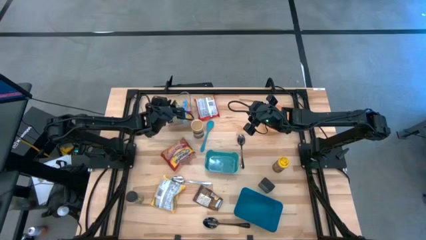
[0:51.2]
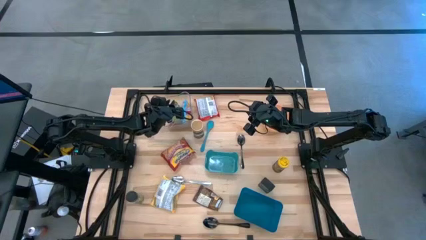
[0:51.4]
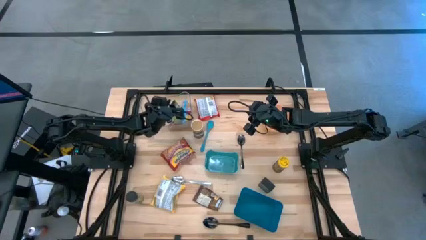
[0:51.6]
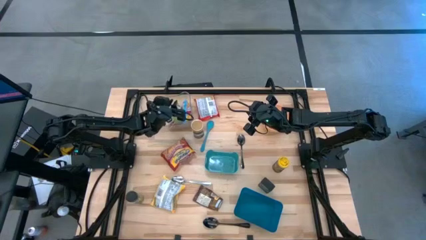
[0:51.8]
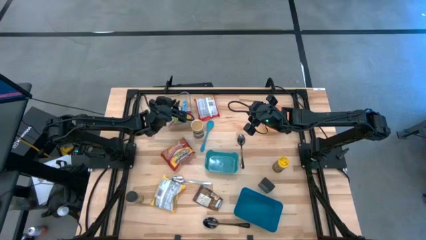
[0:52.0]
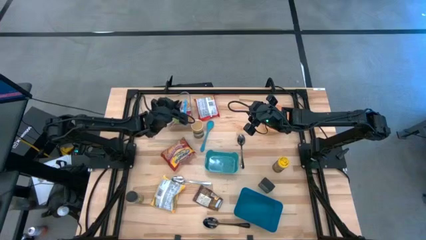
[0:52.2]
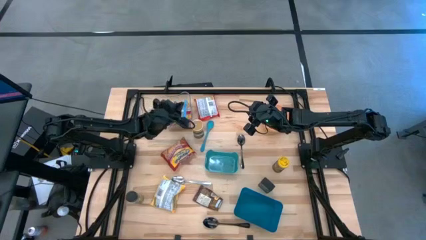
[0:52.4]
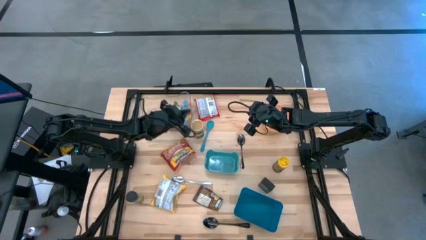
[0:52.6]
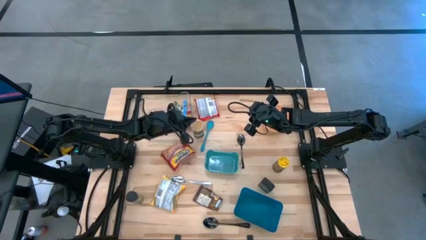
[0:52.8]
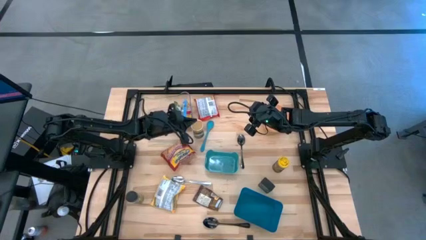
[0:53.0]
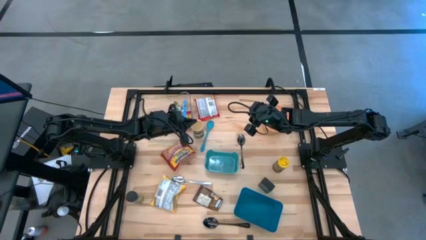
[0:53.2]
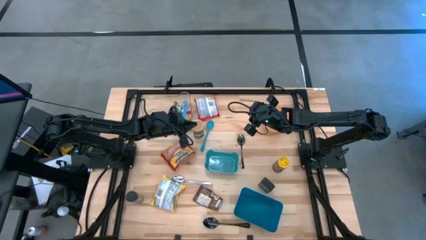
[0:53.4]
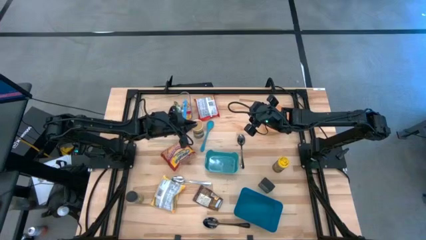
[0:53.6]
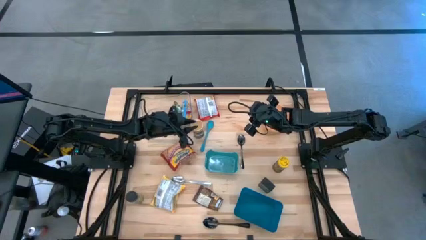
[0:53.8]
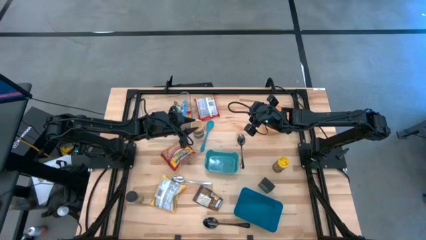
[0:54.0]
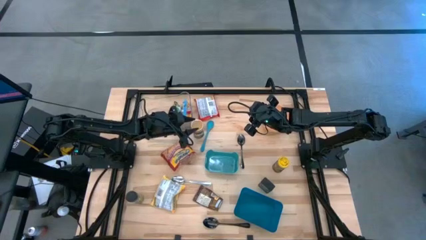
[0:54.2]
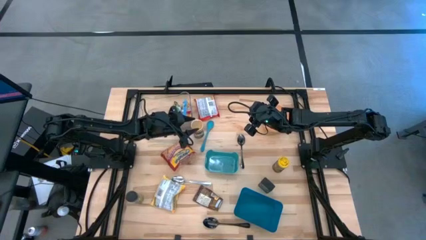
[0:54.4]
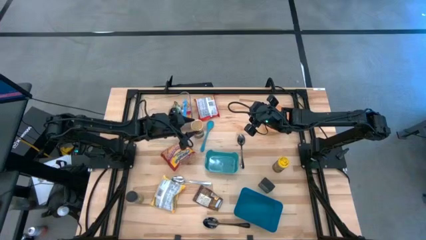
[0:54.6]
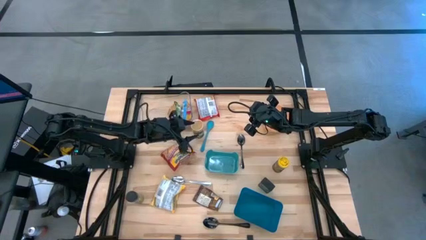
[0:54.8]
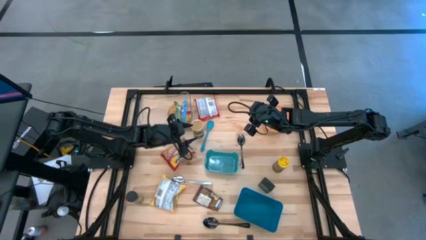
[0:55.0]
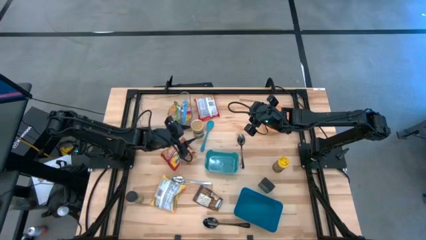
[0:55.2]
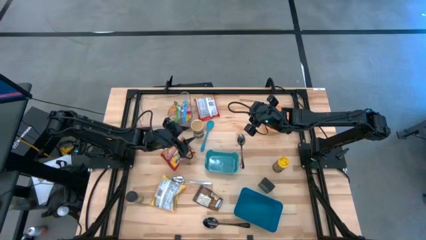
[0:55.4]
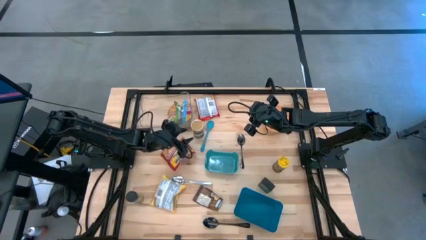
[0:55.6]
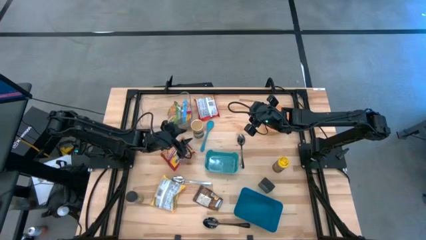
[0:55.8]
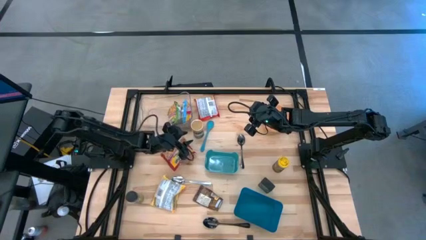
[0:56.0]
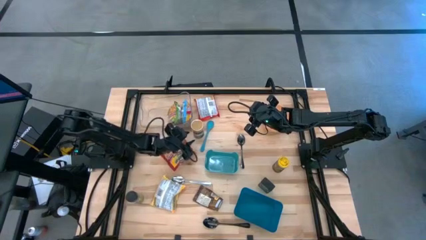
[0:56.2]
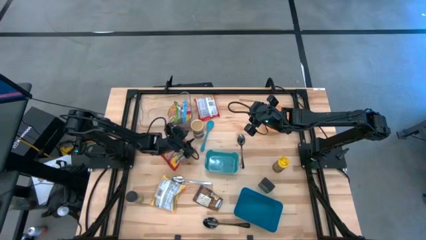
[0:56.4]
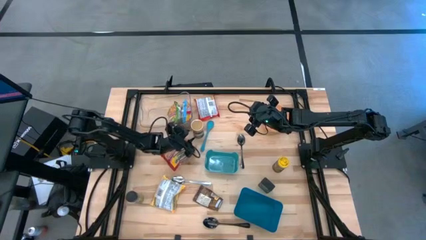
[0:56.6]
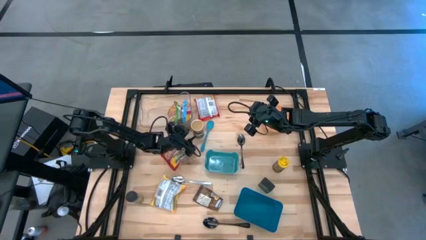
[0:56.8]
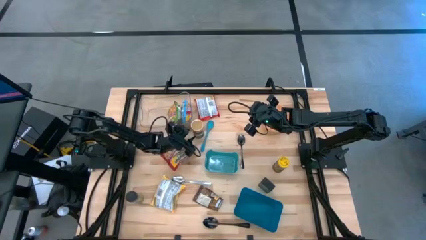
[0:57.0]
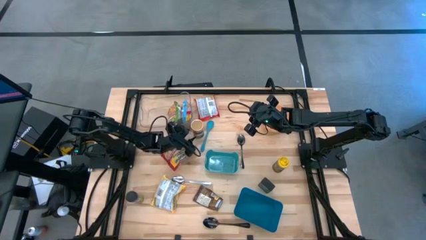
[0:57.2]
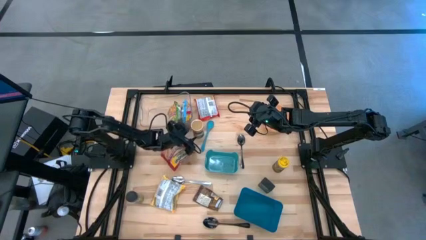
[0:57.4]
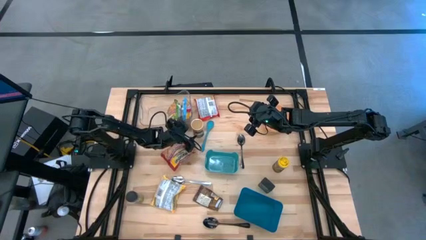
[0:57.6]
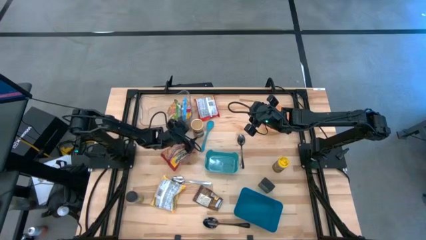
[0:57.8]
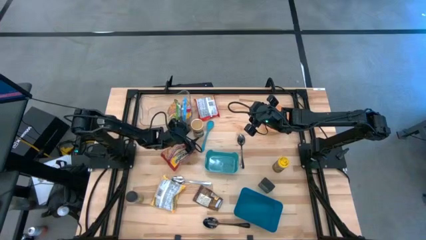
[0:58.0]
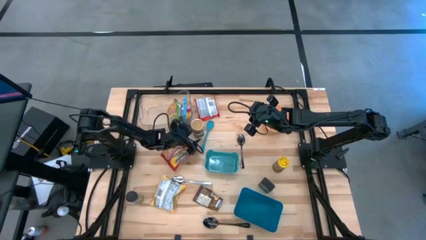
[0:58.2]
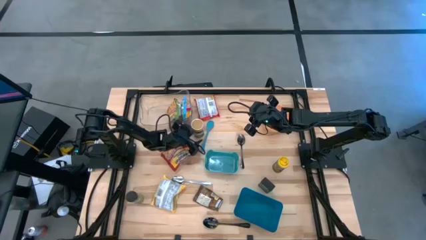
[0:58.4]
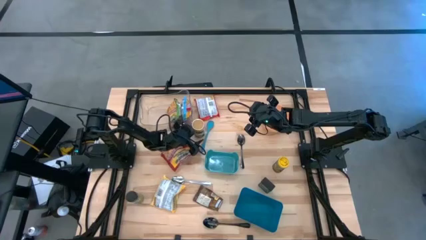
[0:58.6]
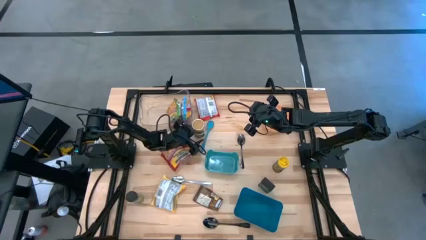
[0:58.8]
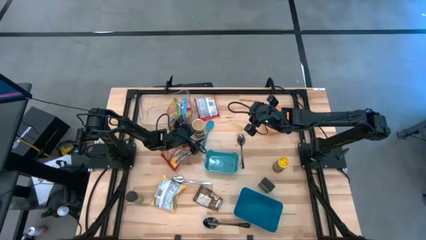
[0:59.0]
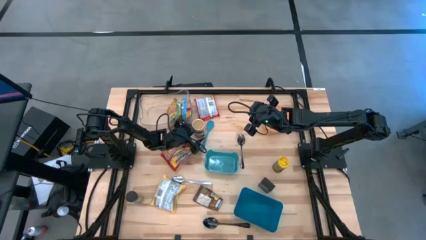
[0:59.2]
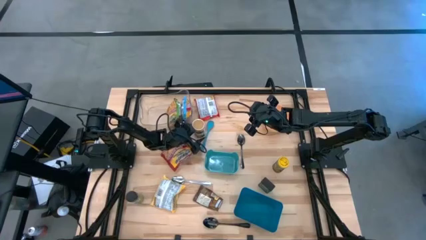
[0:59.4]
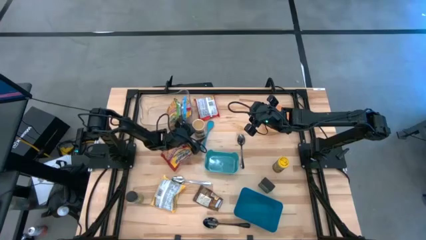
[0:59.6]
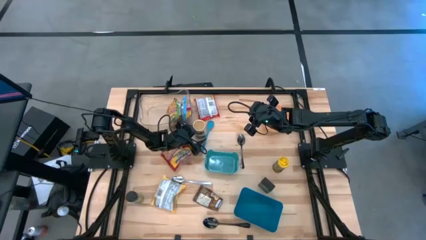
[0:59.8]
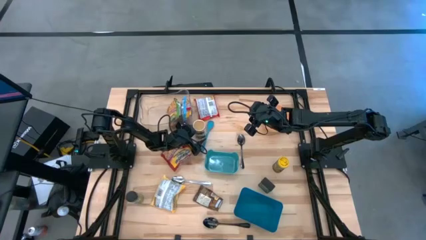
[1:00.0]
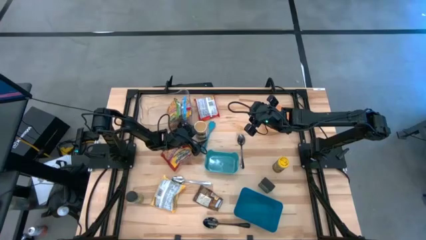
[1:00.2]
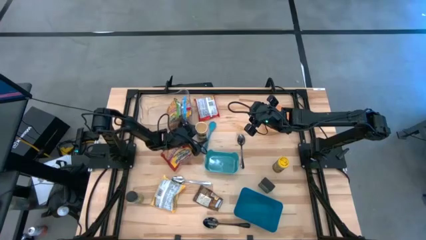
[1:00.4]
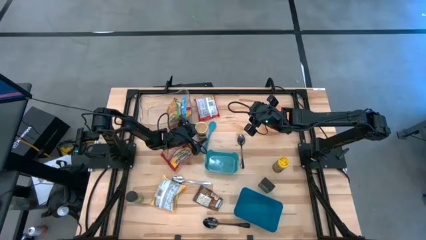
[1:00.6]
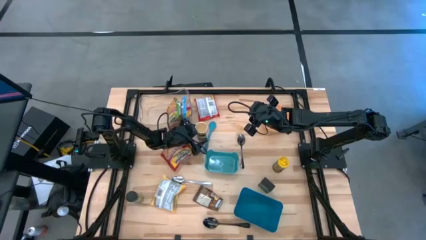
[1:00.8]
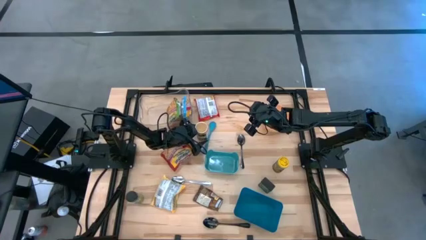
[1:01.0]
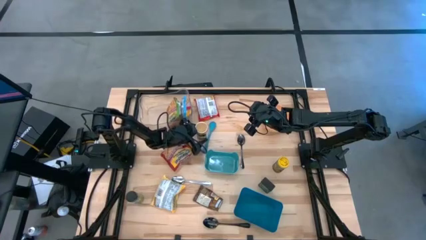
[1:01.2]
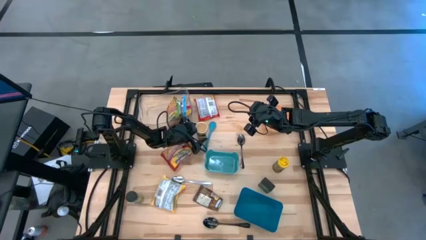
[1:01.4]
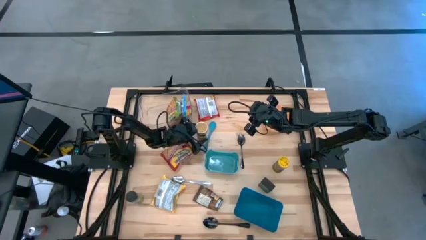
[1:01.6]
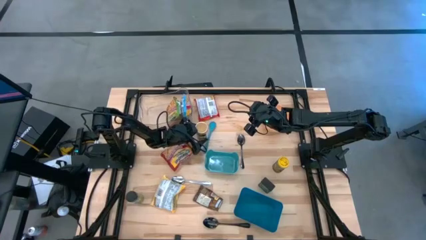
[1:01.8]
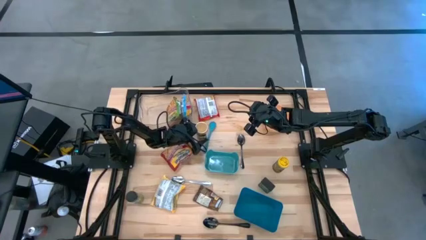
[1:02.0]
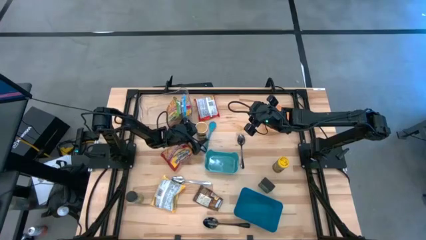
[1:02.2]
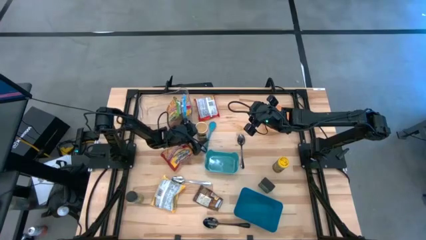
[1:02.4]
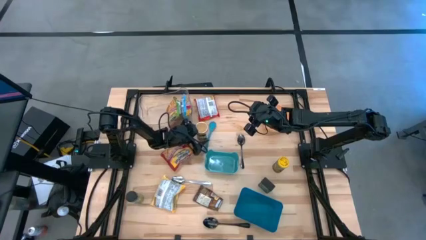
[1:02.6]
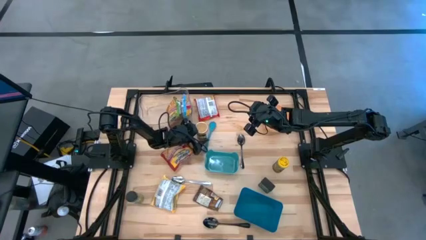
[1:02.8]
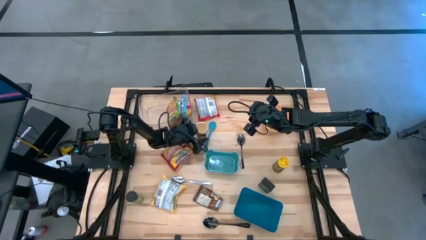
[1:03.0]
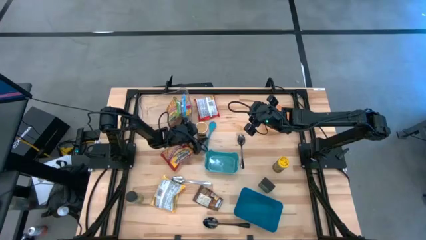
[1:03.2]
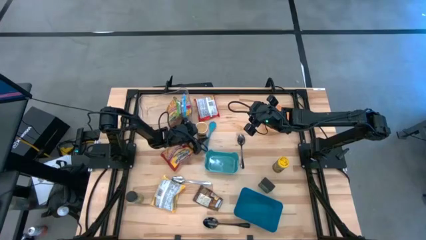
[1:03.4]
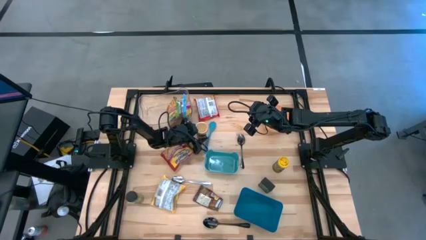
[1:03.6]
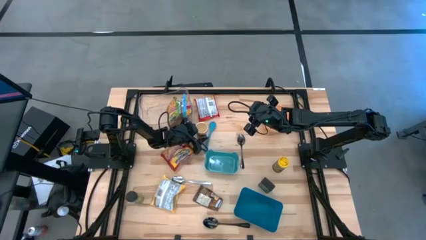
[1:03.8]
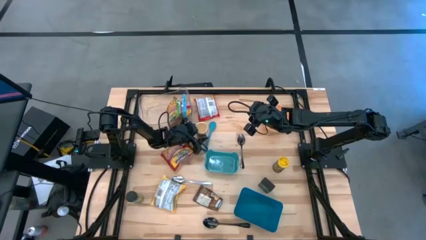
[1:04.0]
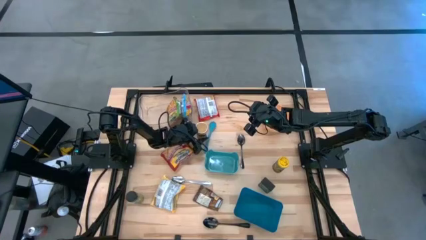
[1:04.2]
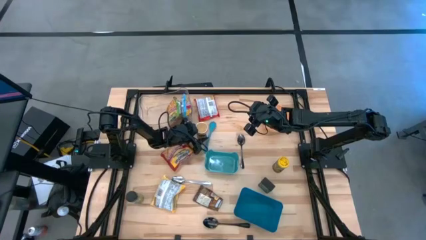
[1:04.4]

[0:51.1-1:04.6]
Task: Pick & Place Food Item
Put the gold seasoning bottle into the blue bin
